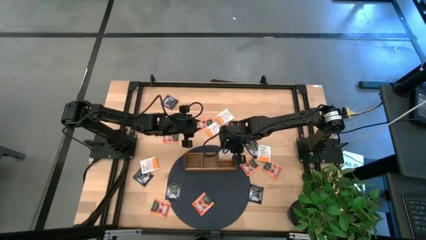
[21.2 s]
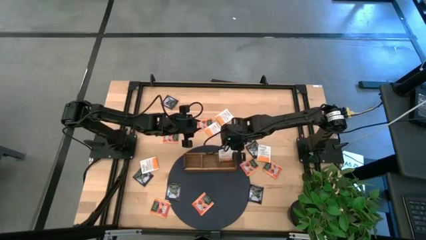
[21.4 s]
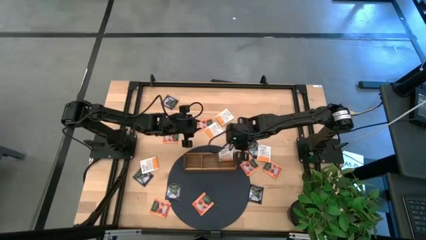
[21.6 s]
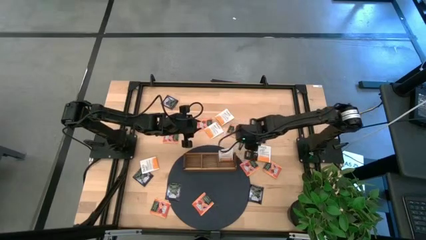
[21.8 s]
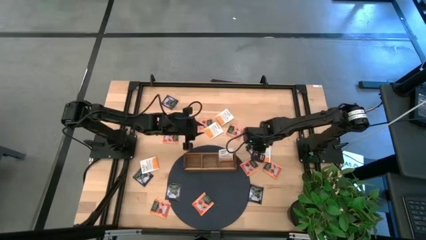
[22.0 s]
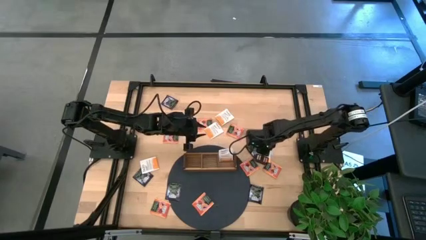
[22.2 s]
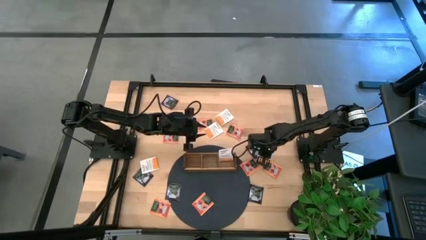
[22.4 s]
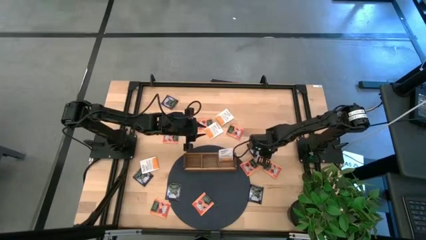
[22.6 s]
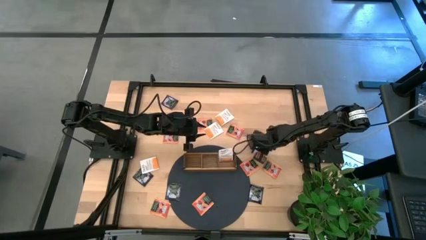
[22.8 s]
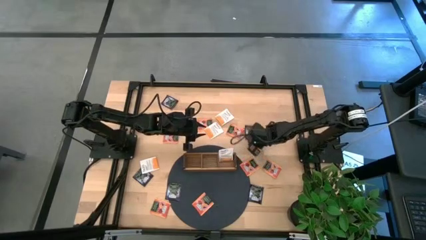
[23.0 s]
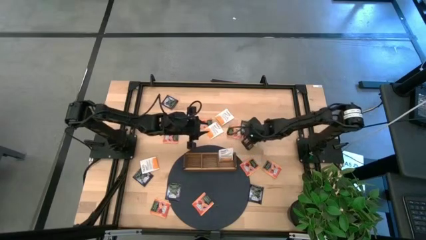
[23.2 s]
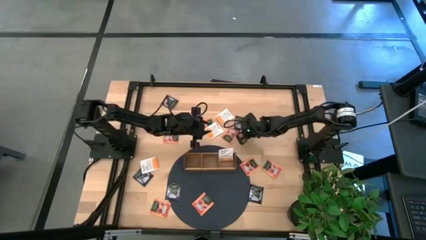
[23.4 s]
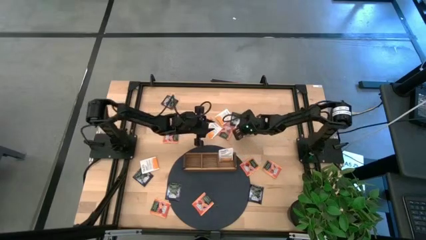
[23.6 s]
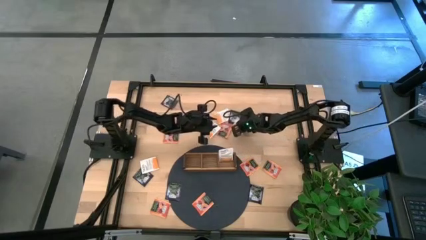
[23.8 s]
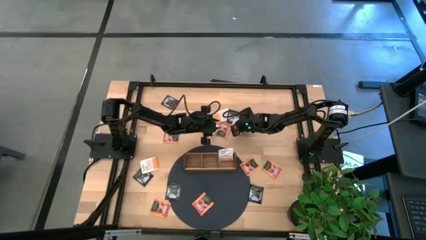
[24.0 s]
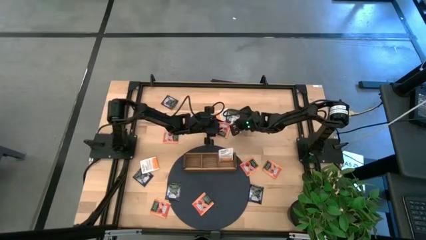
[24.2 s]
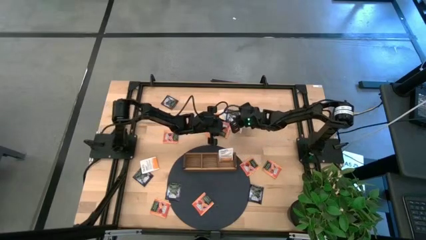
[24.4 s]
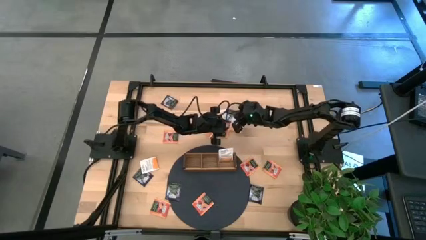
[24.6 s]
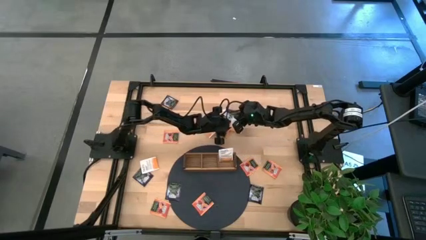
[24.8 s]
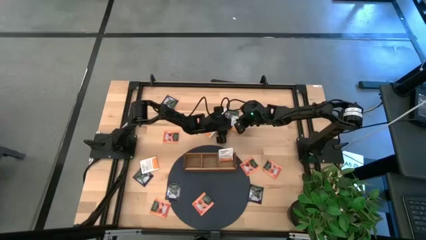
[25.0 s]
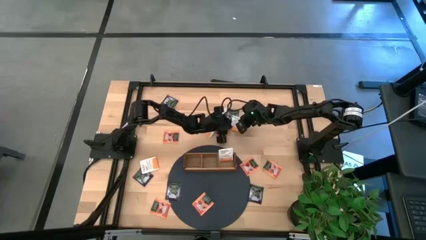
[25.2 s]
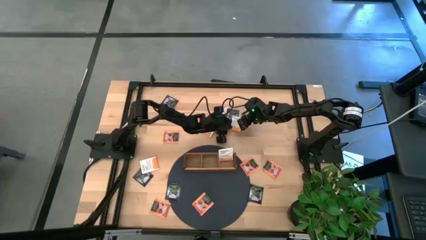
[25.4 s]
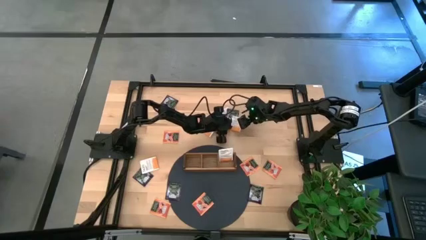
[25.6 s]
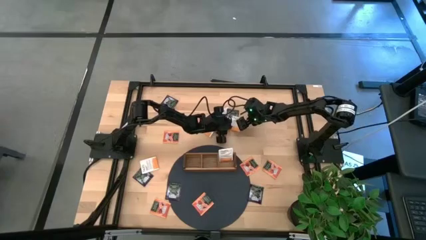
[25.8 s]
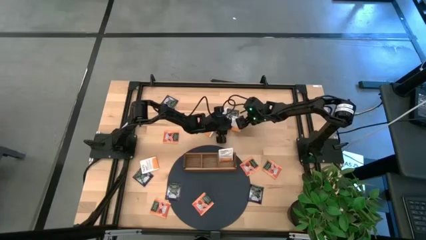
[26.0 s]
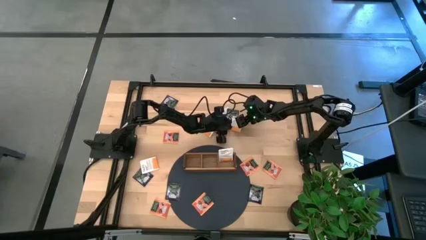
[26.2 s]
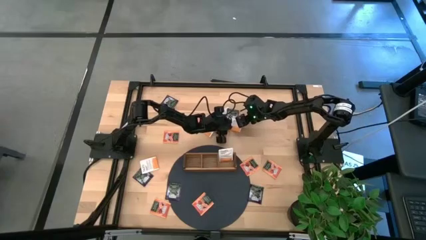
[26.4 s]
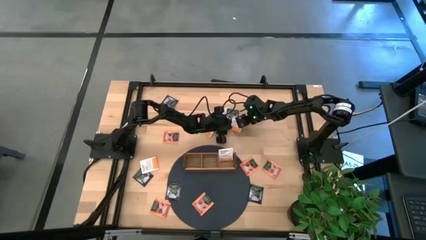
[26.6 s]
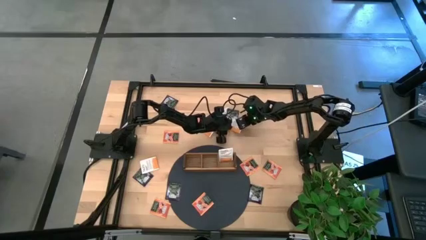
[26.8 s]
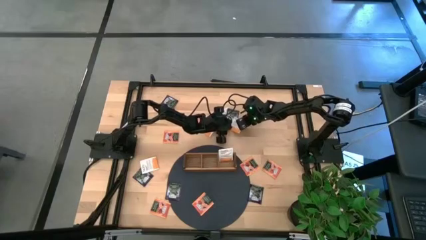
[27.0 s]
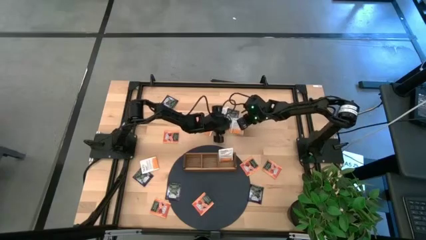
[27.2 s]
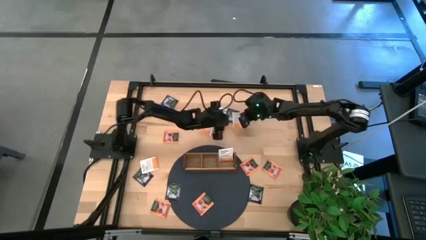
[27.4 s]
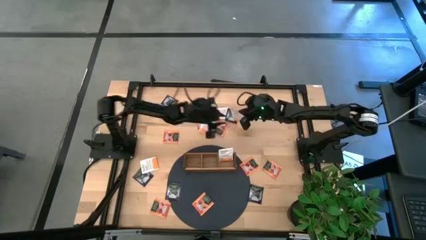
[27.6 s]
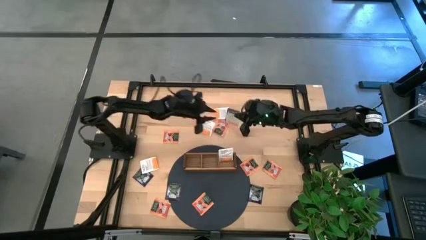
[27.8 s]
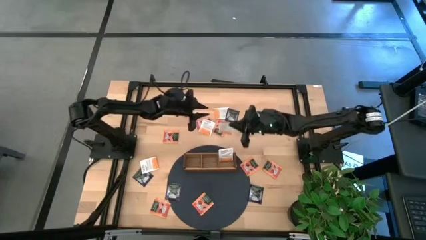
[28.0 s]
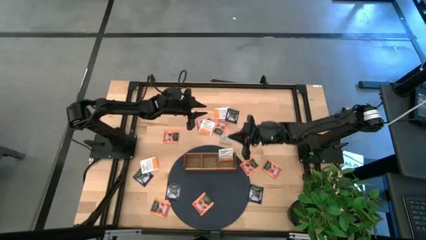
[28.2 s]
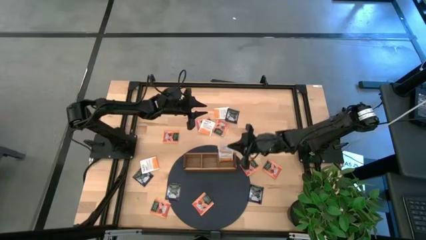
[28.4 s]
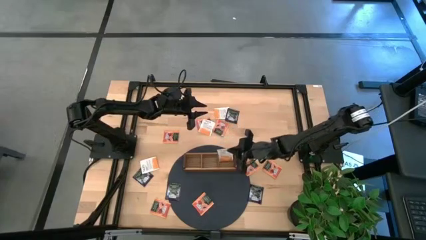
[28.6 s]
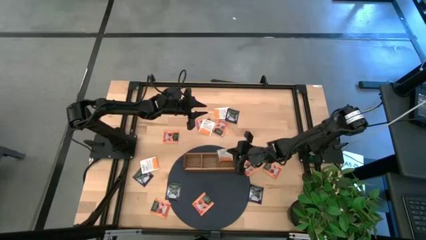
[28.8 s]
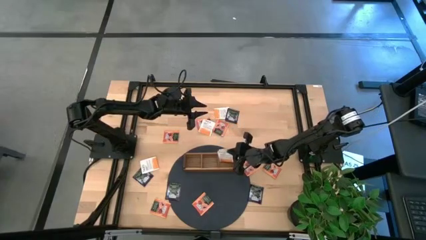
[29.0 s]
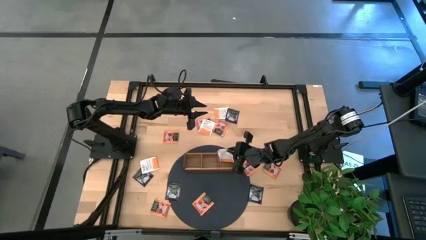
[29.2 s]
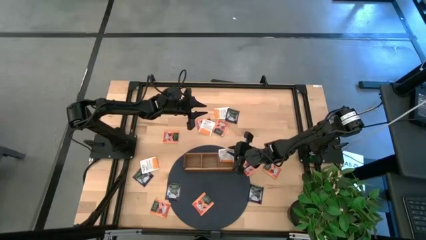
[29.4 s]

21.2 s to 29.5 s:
Task: Pick & Place Tea
Put the white tea bag into the right section of the wooden organizer

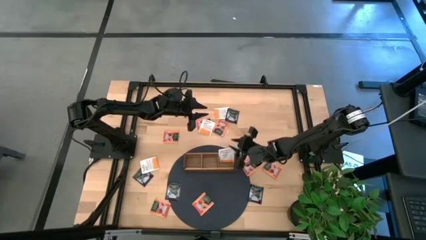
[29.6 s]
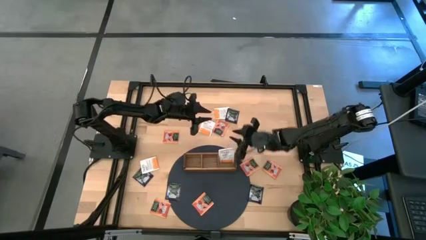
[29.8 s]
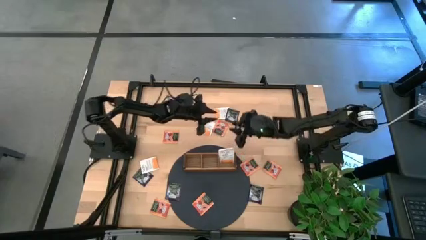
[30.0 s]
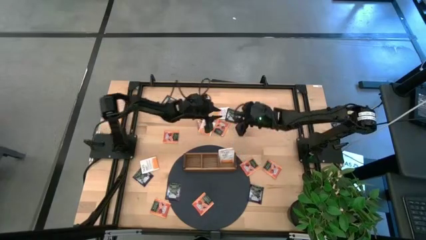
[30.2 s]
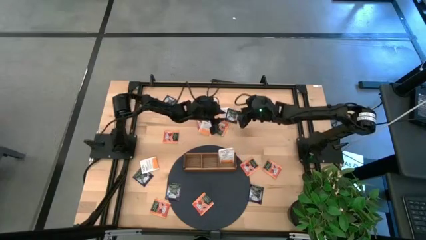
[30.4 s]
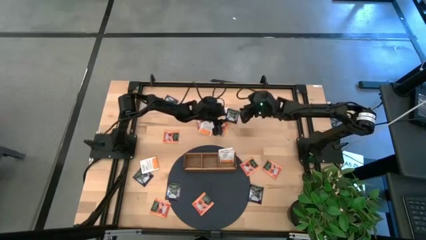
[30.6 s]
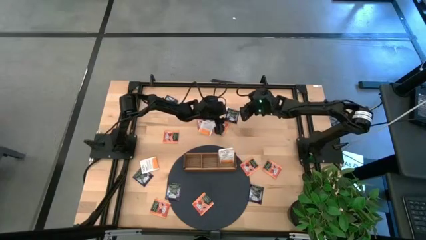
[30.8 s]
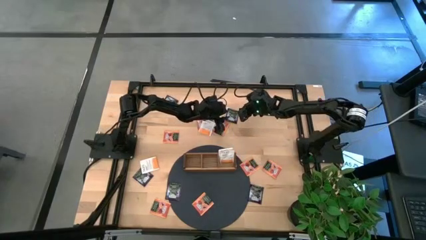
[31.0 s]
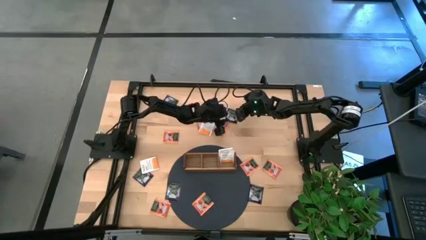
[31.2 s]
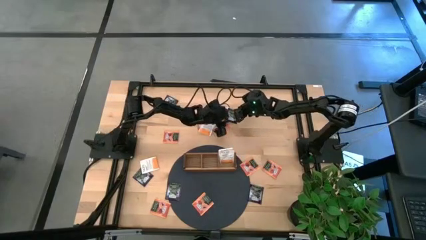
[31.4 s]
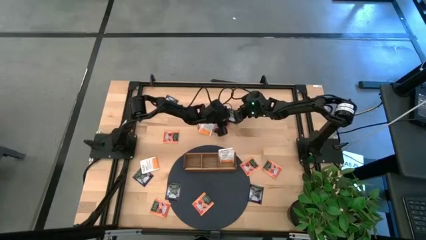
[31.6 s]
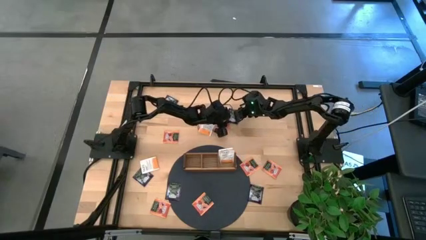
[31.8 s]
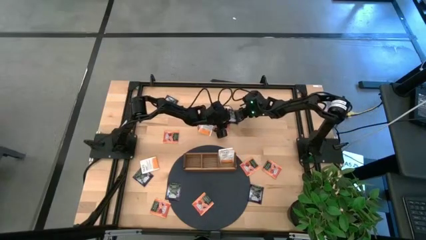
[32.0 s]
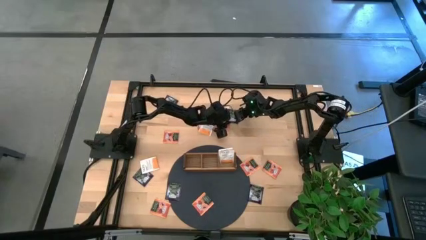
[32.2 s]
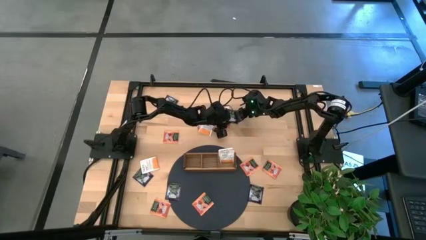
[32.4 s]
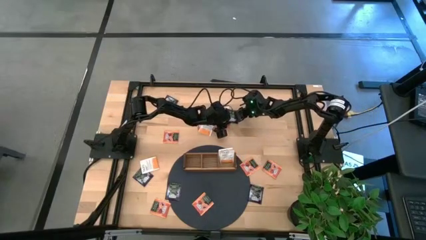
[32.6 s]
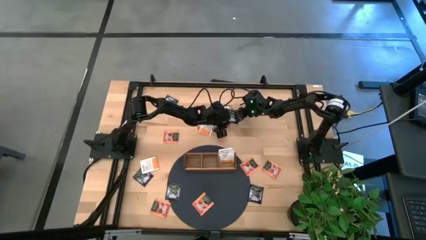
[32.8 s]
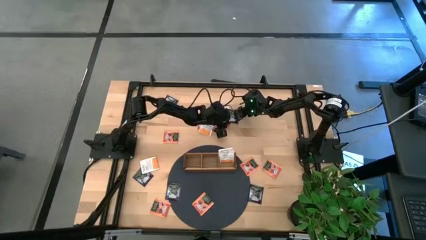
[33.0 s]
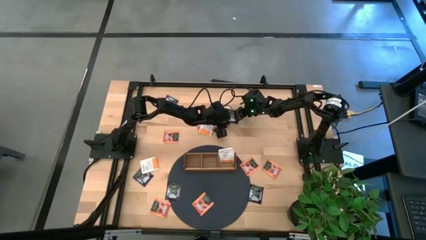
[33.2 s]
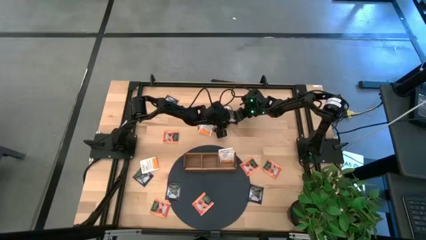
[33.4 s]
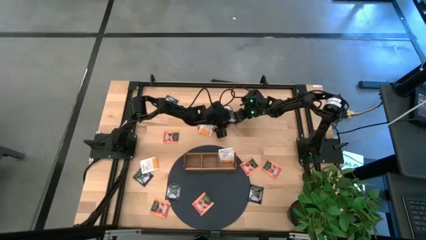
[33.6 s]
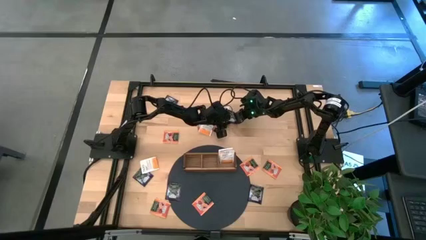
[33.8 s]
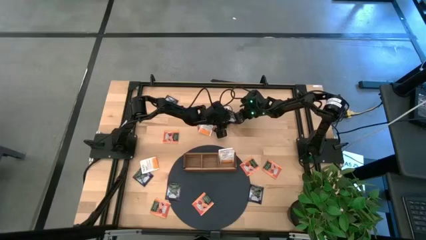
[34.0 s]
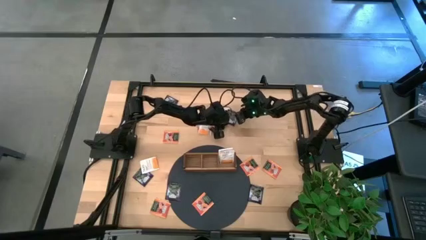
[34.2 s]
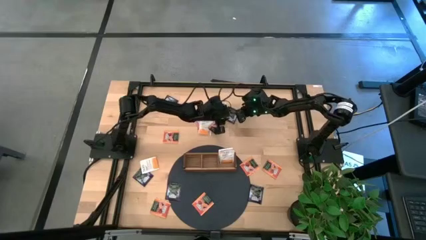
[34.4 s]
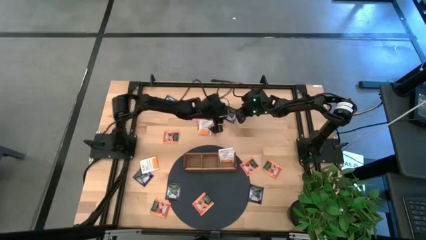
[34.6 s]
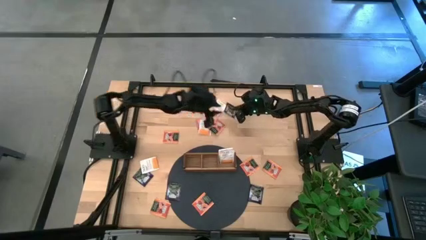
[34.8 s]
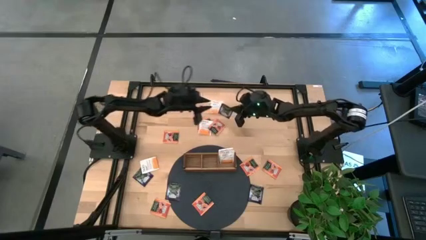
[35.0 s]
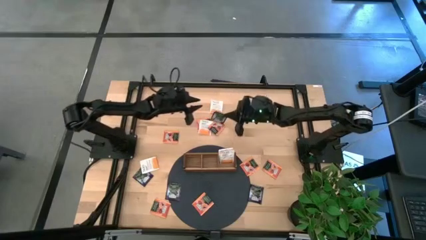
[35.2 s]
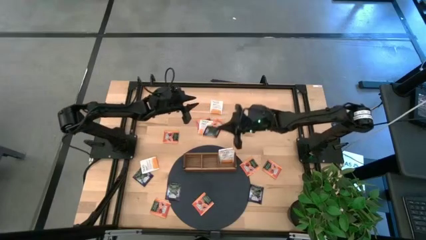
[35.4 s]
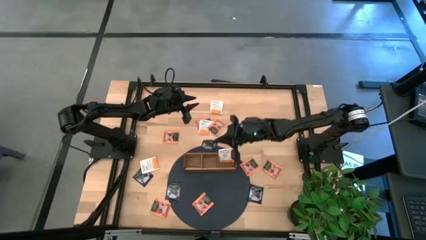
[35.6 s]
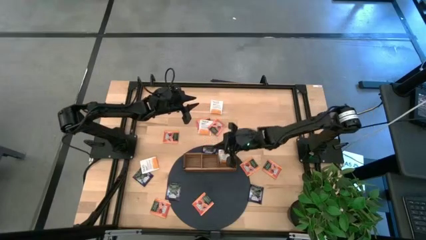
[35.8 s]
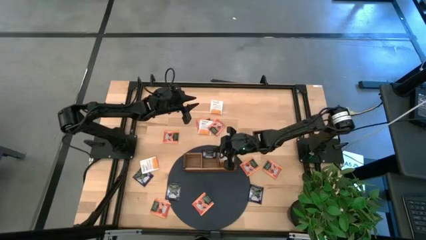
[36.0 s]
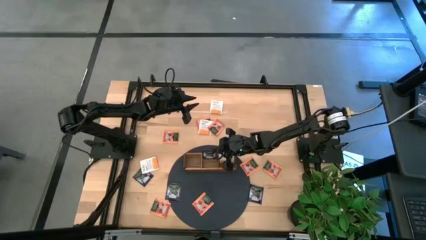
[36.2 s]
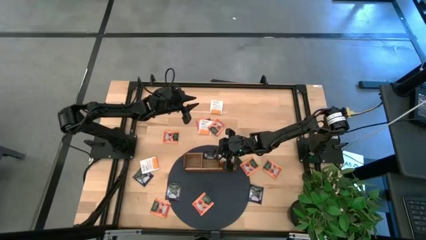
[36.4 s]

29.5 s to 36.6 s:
Put the black tea bag into the middle section of the wooden organizer
